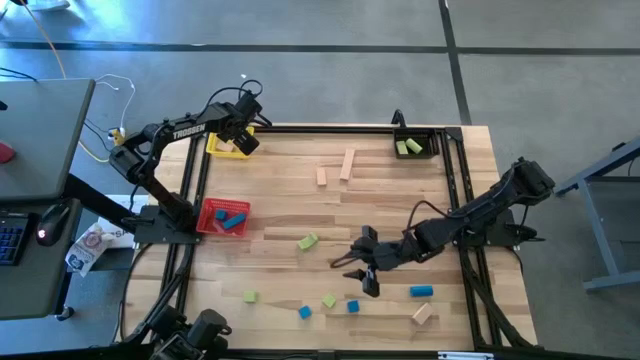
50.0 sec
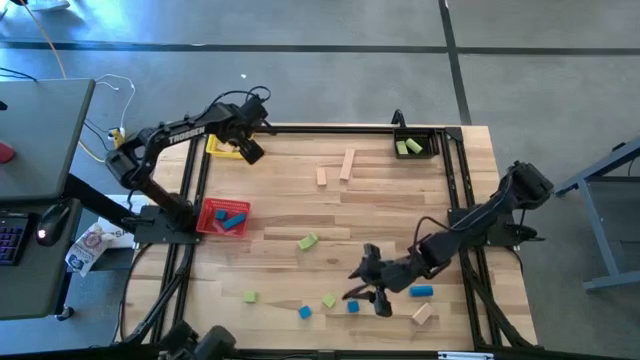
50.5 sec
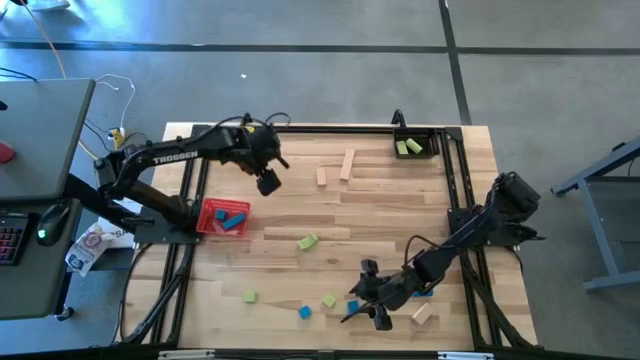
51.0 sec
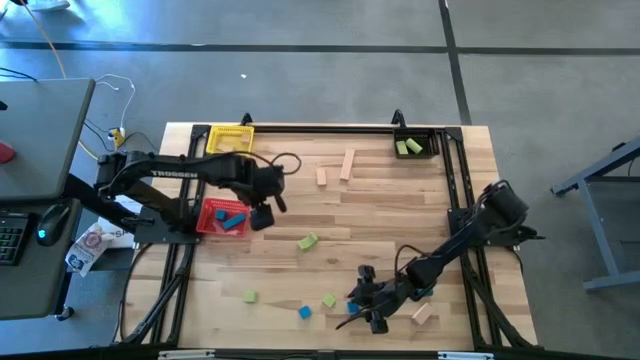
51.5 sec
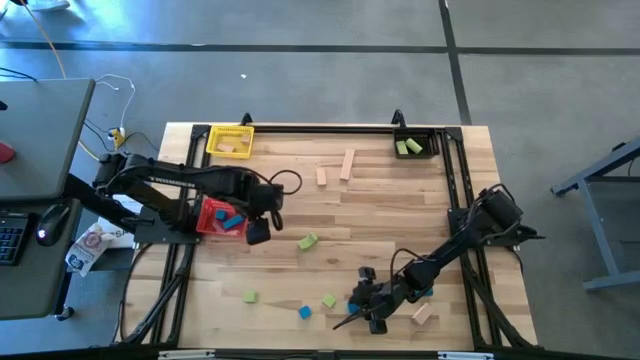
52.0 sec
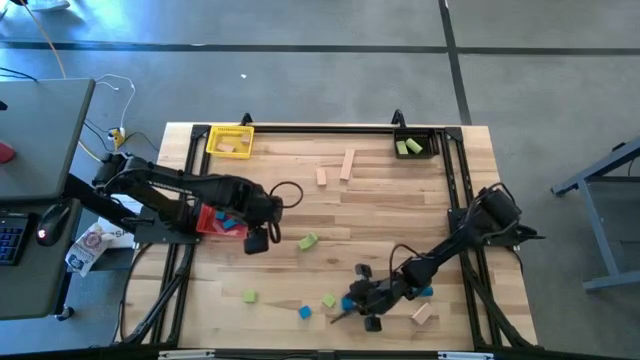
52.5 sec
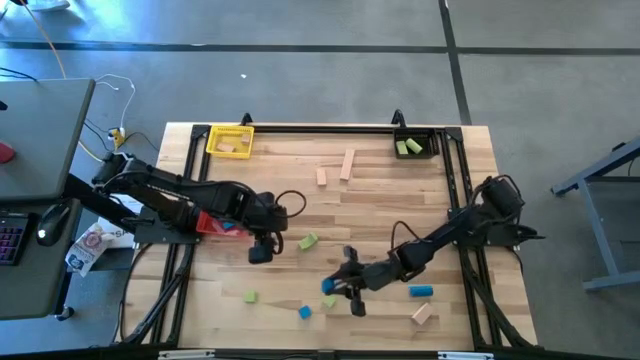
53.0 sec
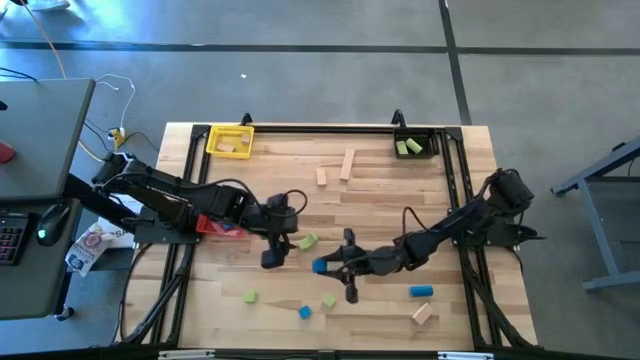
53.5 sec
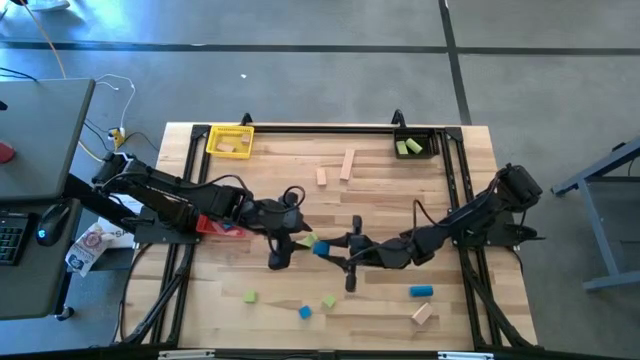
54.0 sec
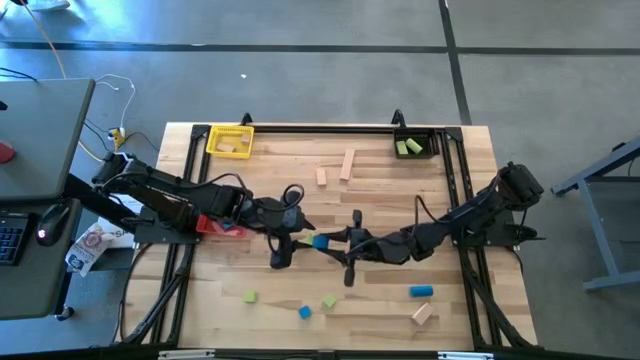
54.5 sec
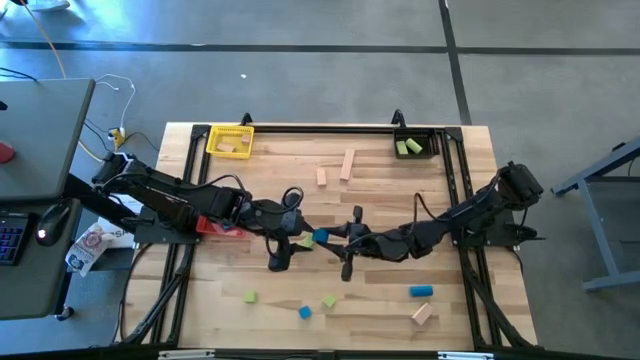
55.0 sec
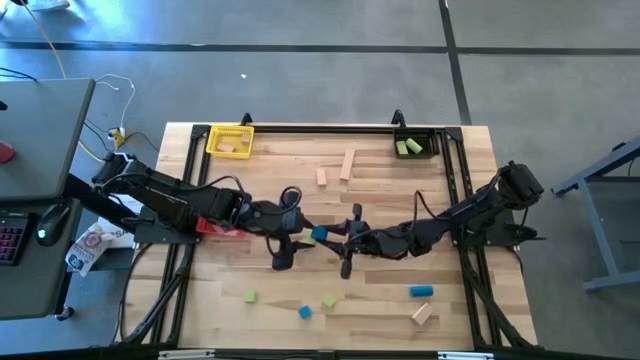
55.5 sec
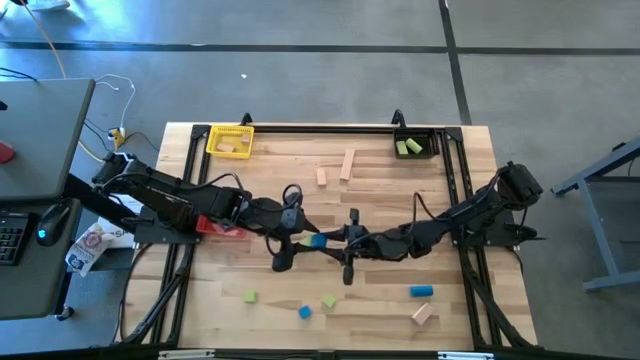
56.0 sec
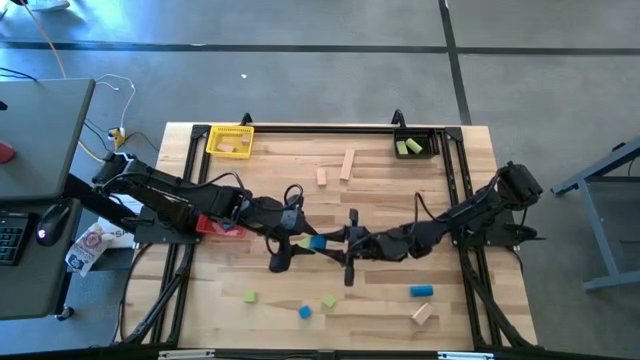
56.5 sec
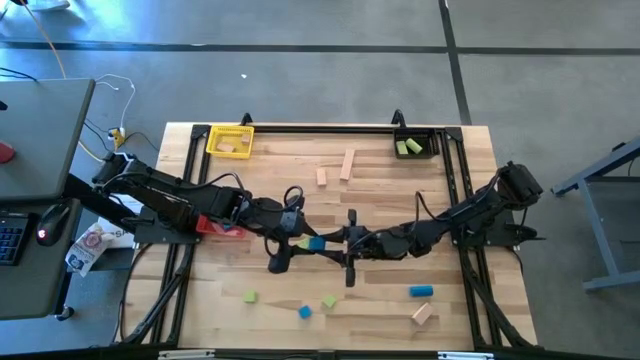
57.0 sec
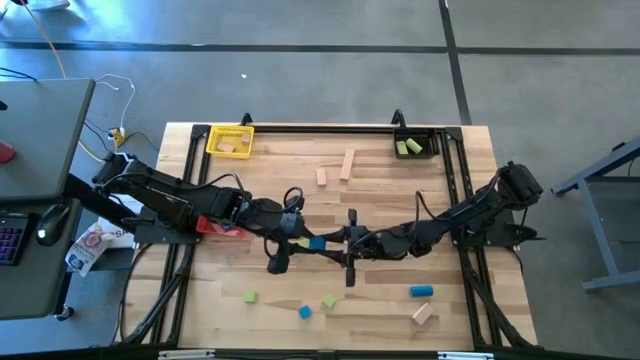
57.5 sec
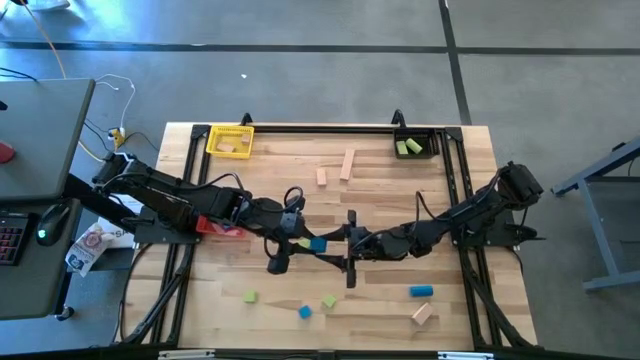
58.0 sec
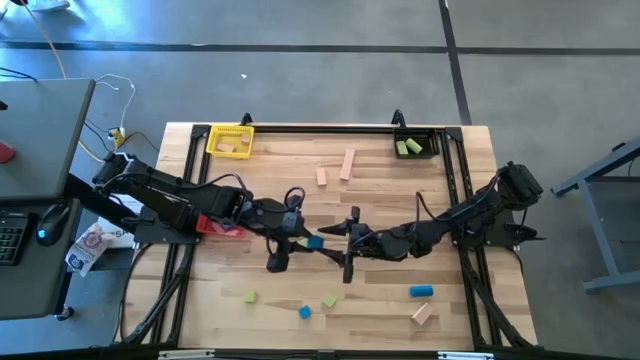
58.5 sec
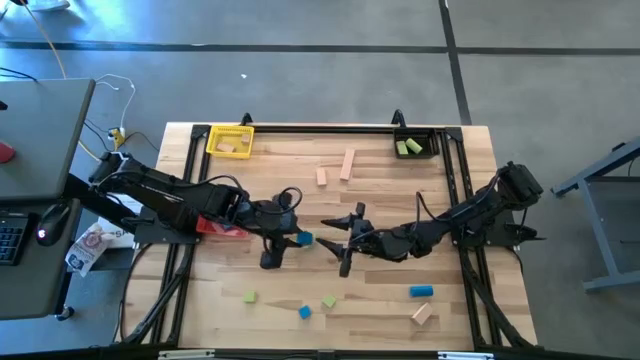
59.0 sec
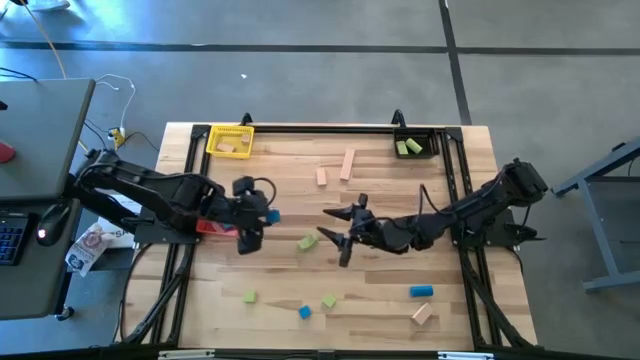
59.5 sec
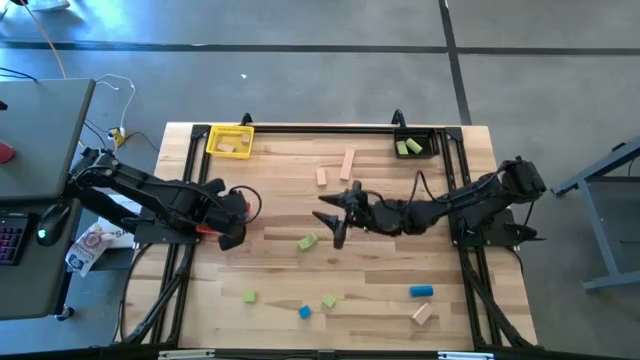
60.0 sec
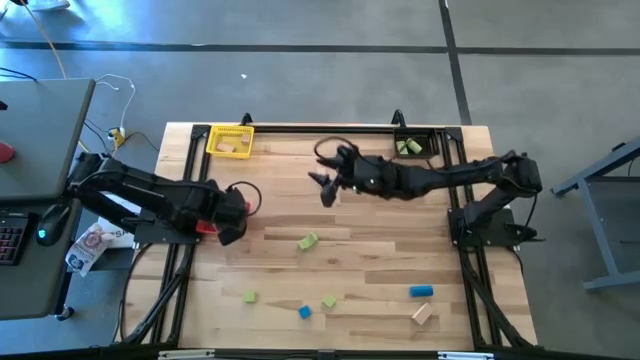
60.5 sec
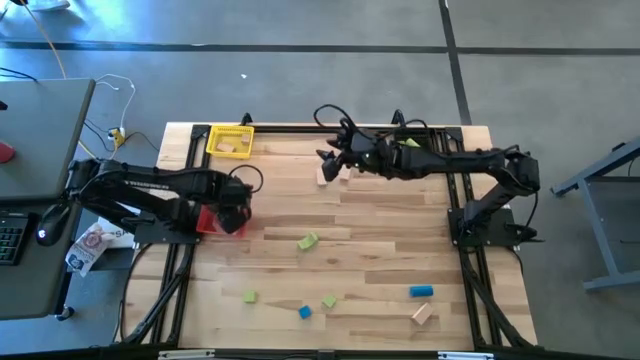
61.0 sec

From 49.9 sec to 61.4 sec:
Task: Sort & place blocks by color
Put the blue block into the red bin

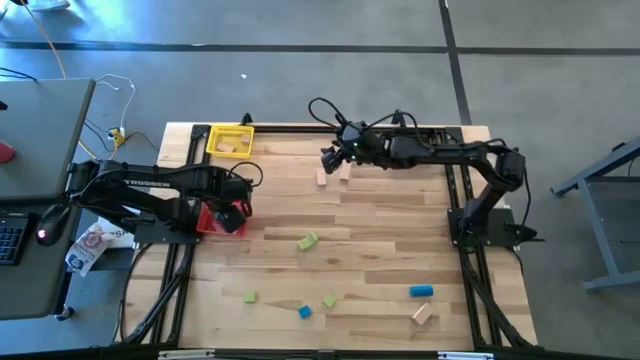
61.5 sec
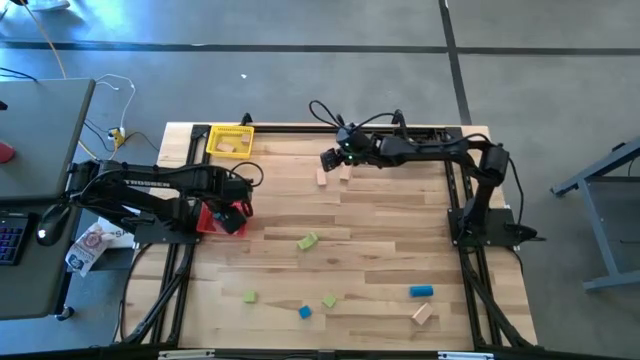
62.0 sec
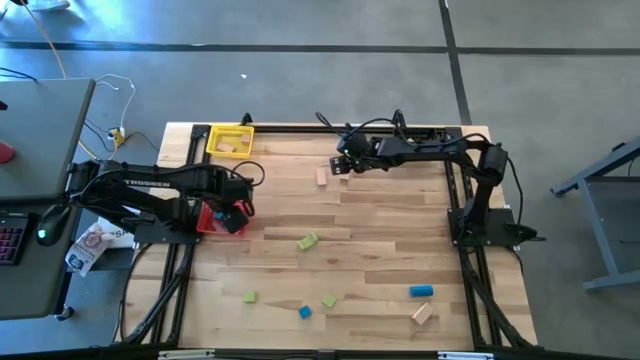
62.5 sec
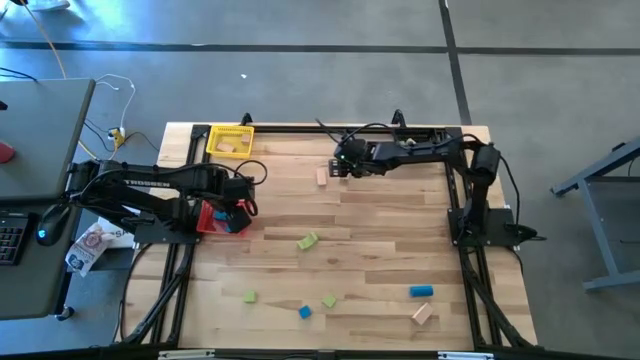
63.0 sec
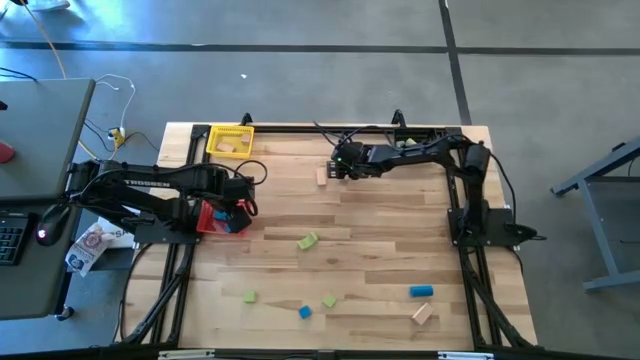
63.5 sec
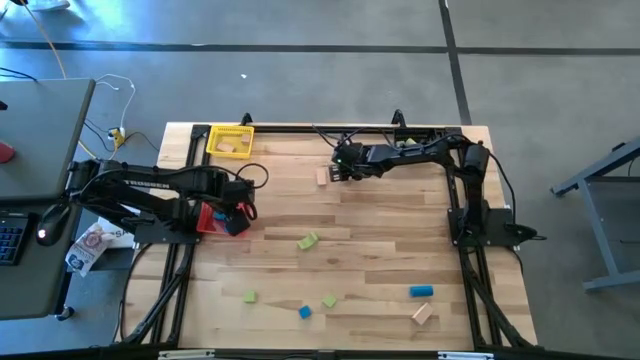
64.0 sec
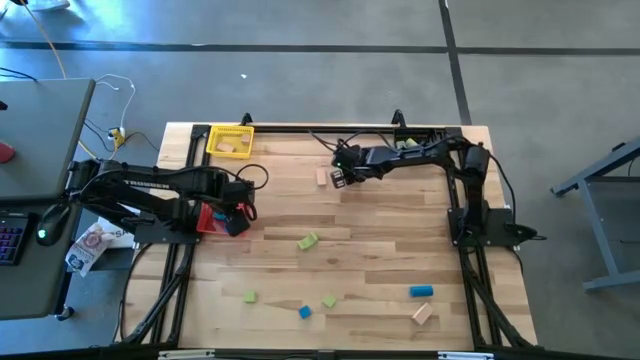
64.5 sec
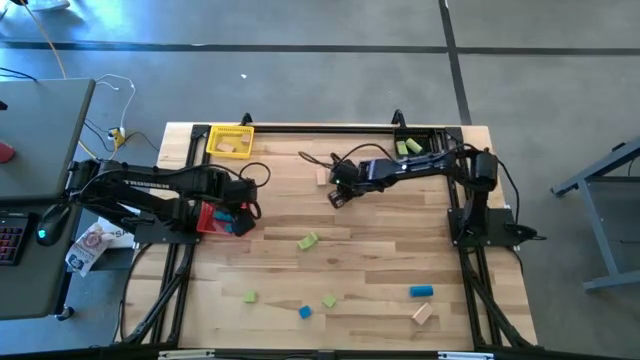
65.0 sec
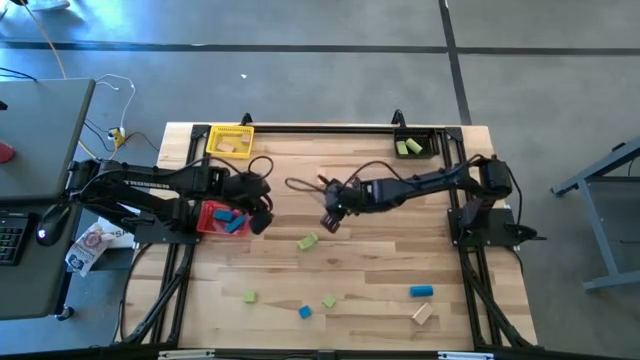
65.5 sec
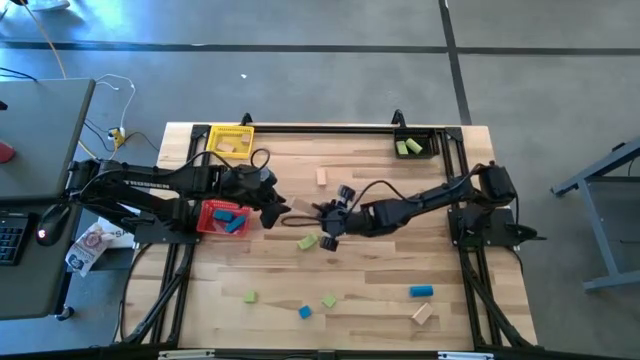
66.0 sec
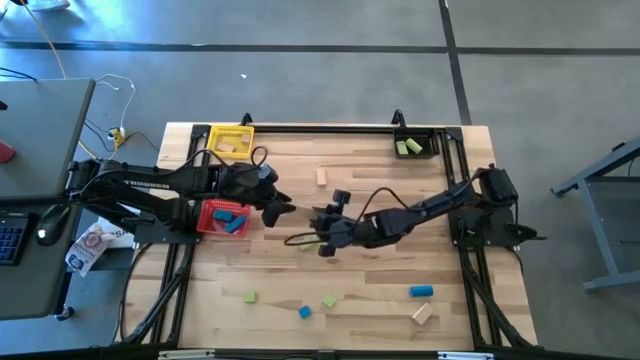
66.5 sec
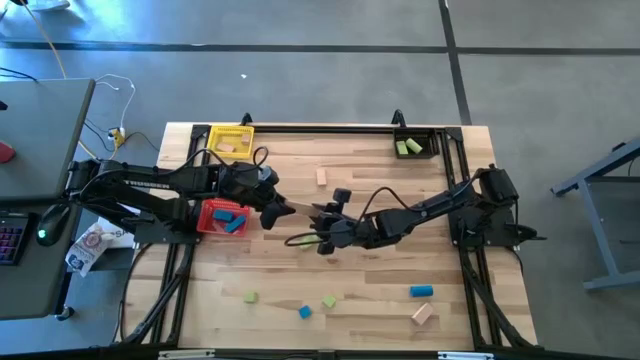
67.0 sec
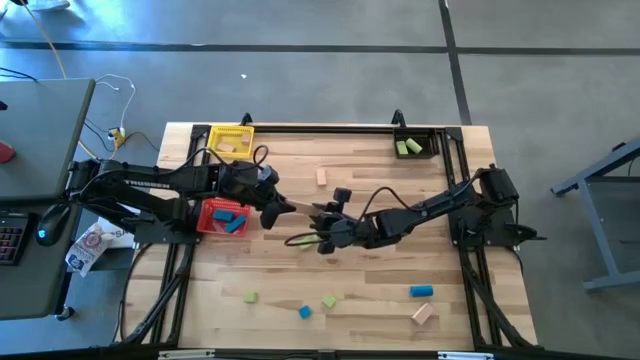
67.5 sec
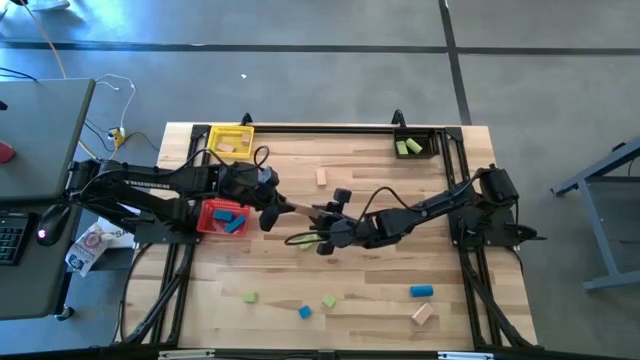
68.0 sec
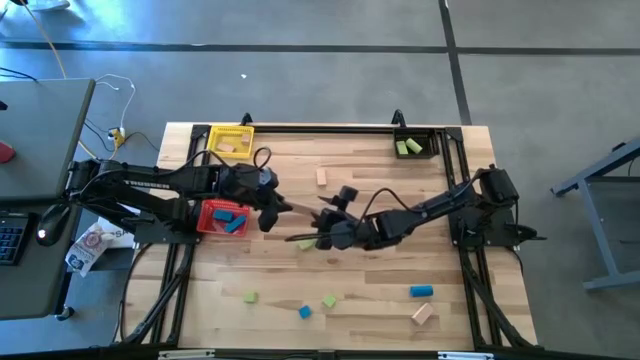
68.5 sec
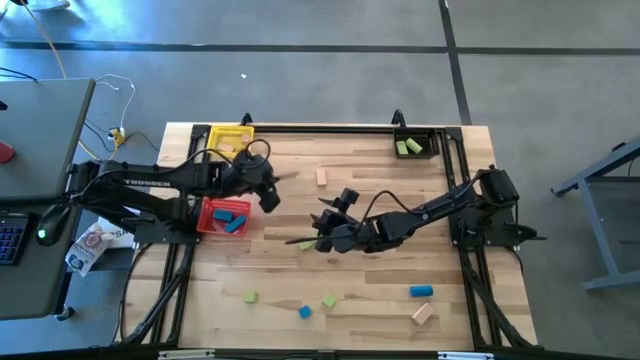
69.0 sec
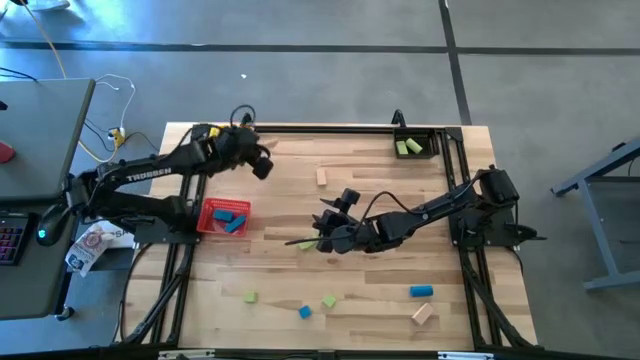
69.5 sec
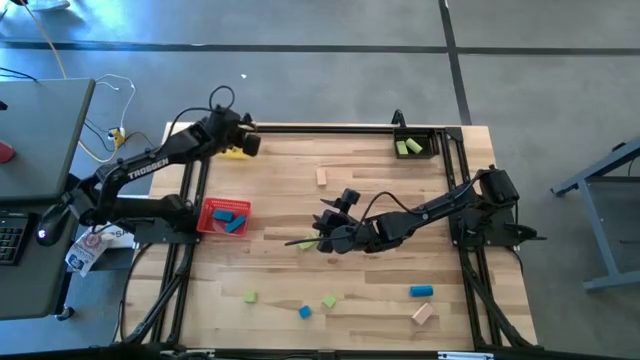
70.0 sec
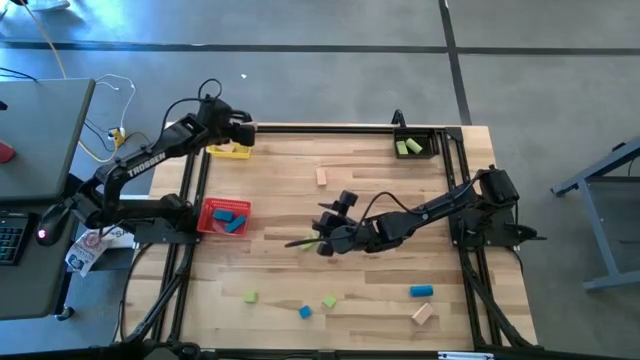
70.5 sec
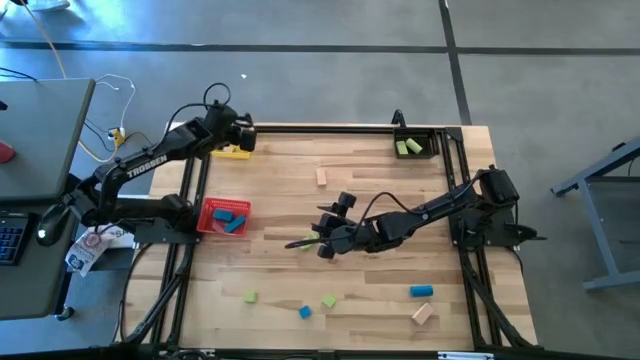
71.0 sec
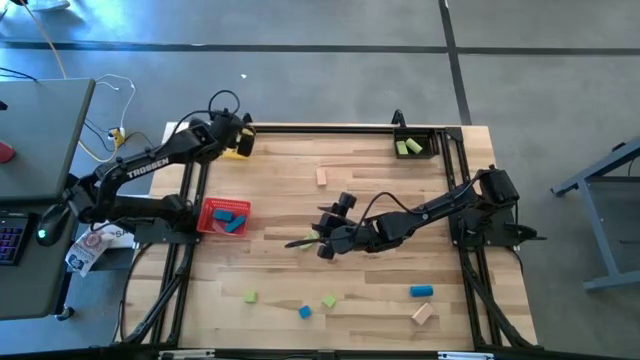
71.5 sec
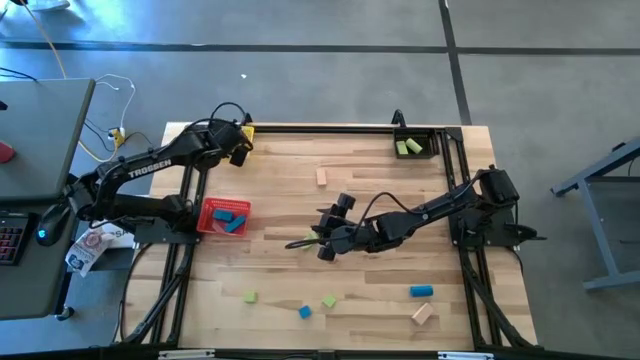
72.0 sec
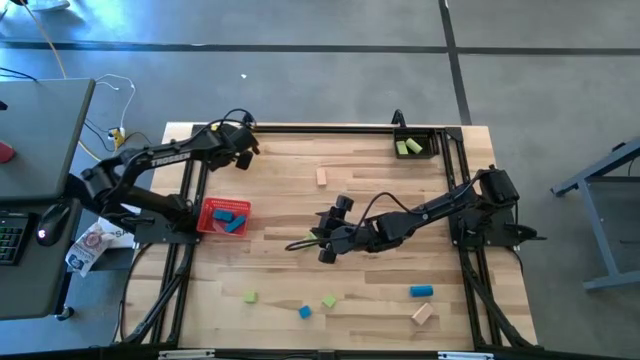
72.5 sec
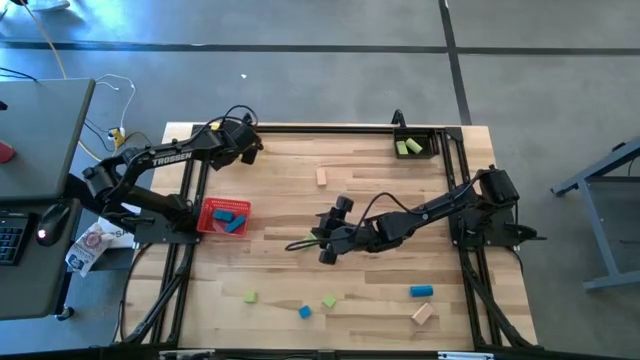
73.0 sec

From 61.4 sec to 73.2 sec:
Put the brown block into the yellow bin
